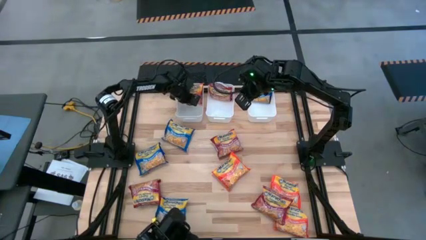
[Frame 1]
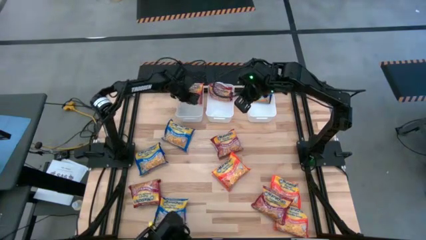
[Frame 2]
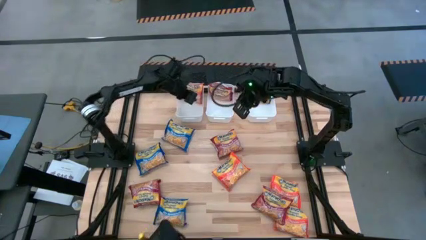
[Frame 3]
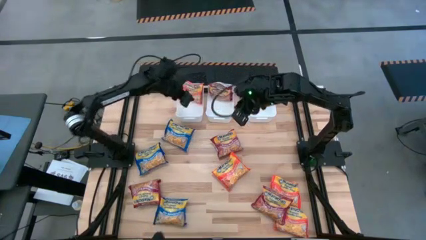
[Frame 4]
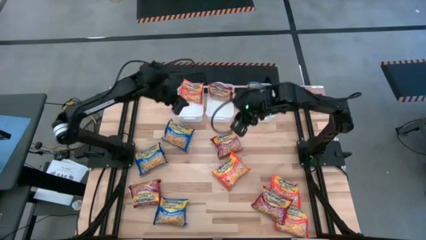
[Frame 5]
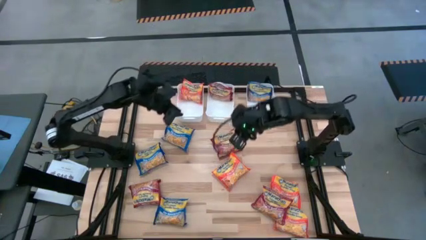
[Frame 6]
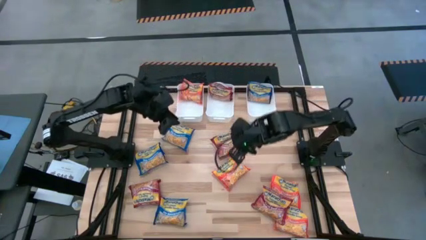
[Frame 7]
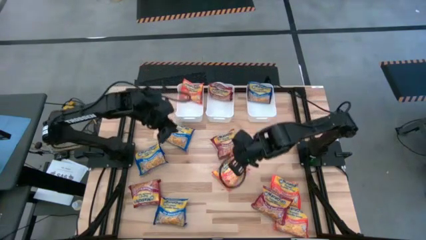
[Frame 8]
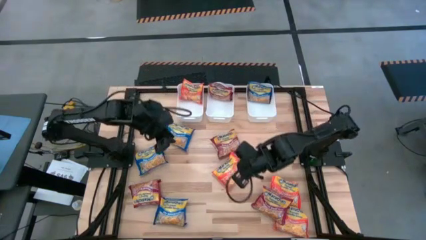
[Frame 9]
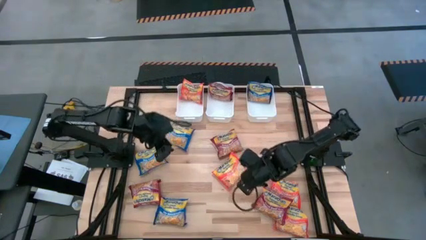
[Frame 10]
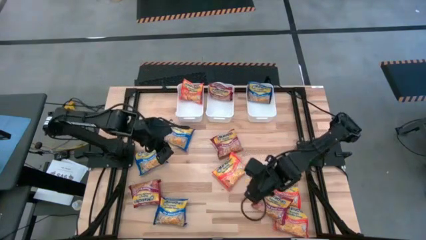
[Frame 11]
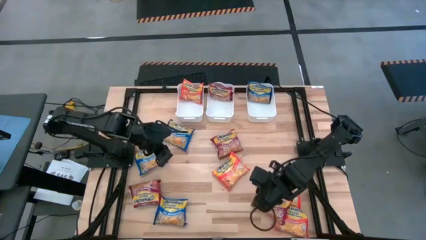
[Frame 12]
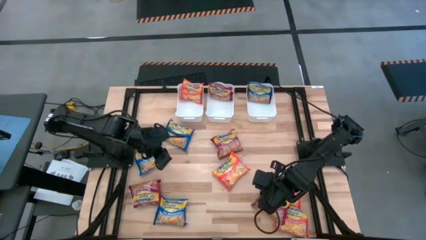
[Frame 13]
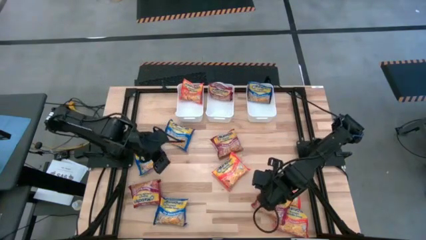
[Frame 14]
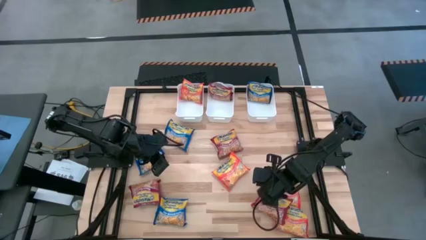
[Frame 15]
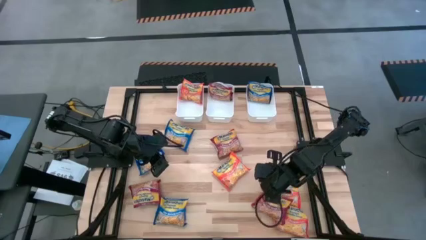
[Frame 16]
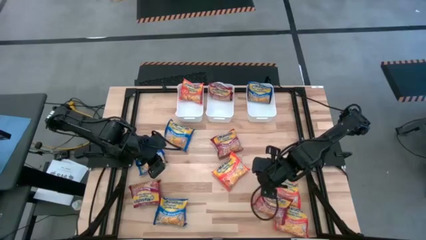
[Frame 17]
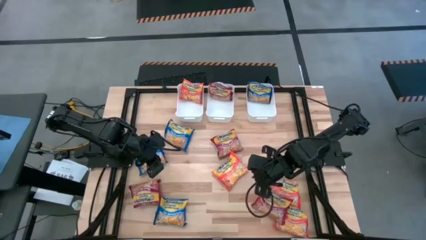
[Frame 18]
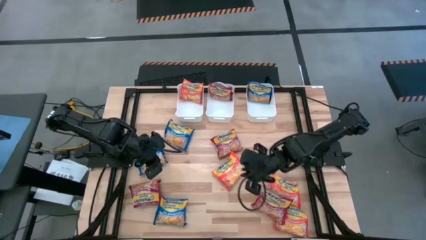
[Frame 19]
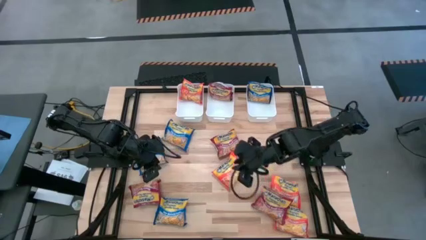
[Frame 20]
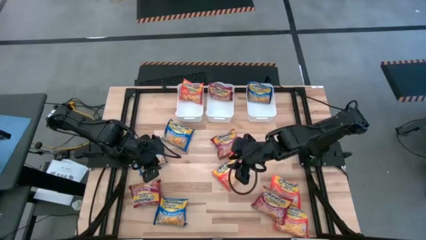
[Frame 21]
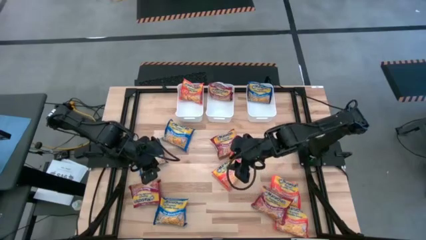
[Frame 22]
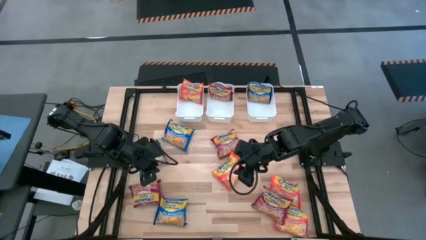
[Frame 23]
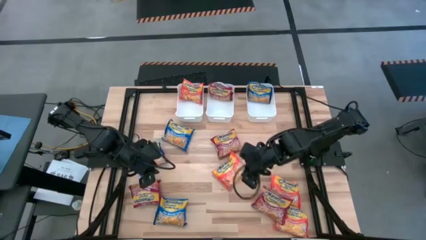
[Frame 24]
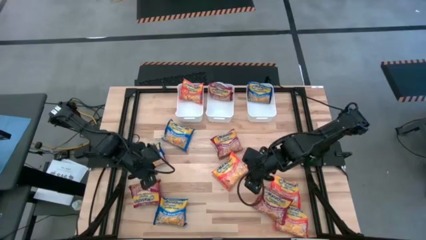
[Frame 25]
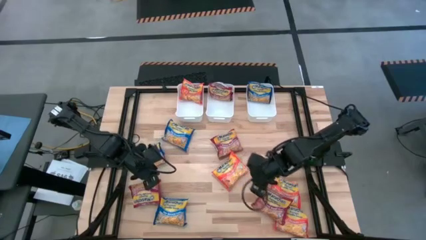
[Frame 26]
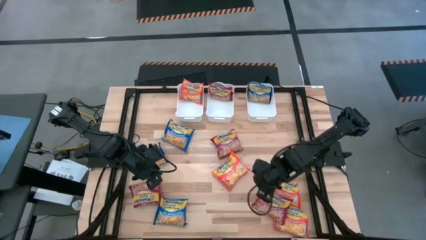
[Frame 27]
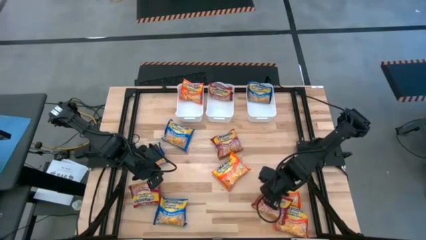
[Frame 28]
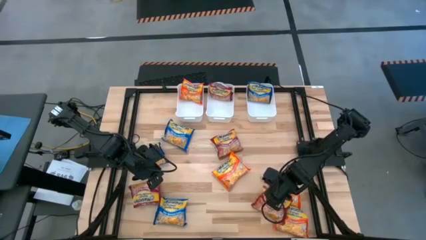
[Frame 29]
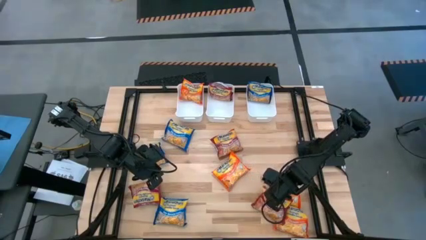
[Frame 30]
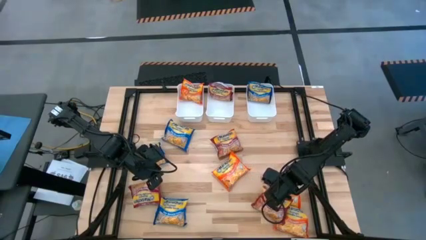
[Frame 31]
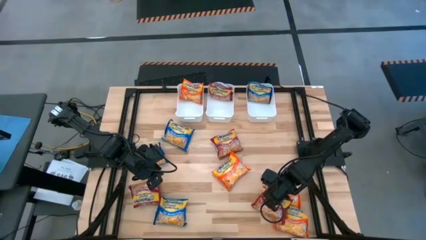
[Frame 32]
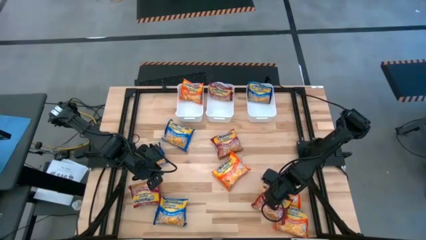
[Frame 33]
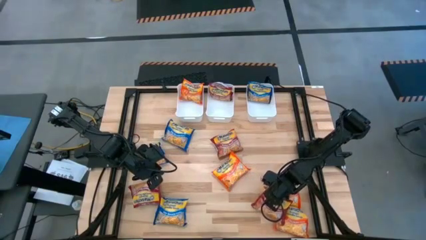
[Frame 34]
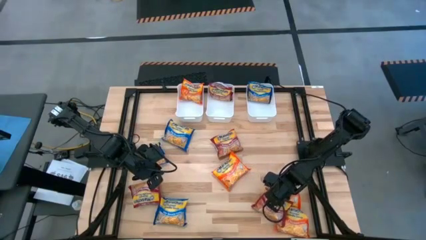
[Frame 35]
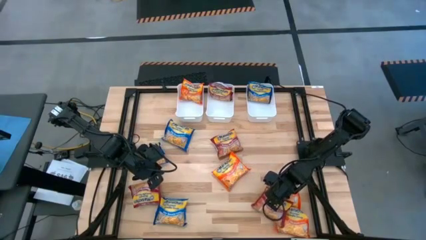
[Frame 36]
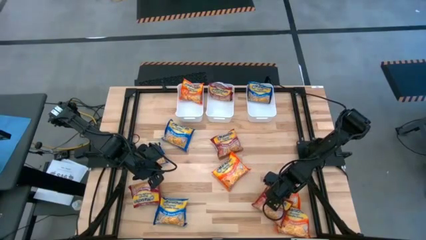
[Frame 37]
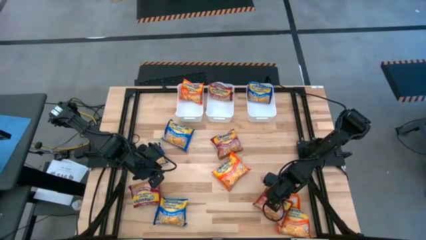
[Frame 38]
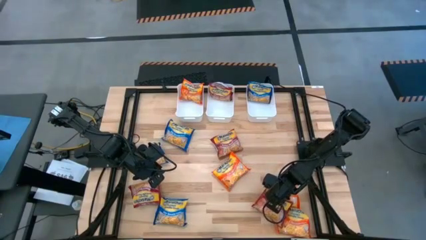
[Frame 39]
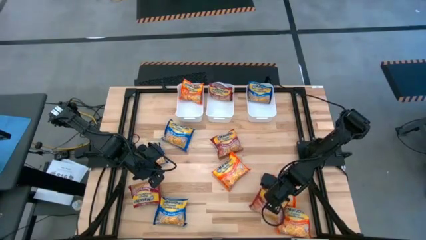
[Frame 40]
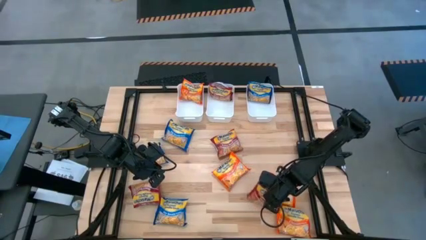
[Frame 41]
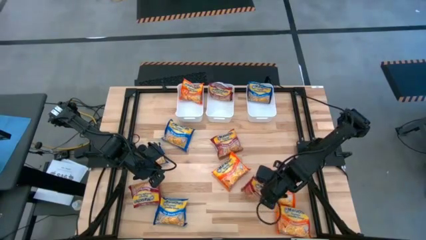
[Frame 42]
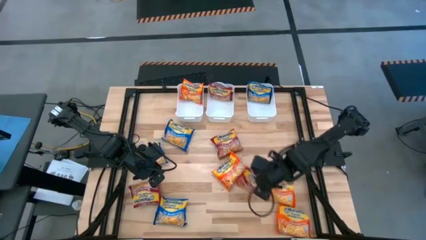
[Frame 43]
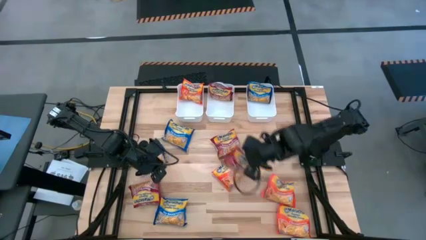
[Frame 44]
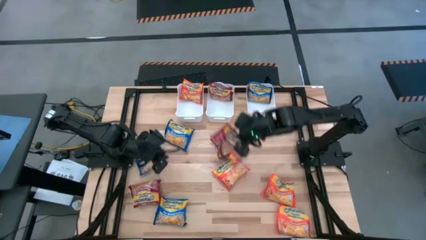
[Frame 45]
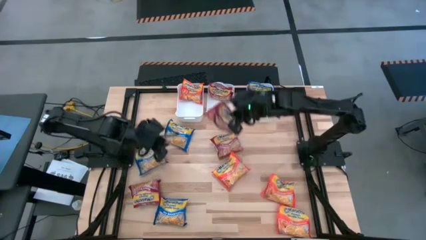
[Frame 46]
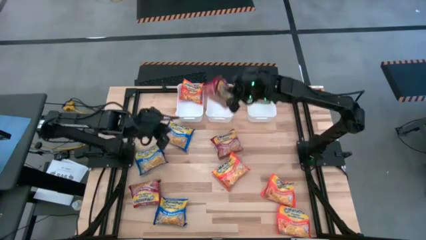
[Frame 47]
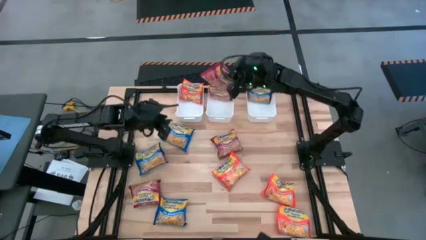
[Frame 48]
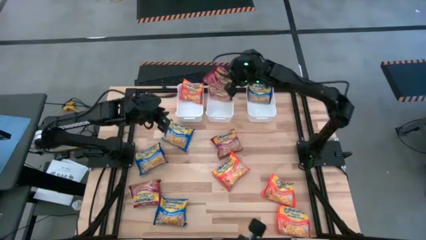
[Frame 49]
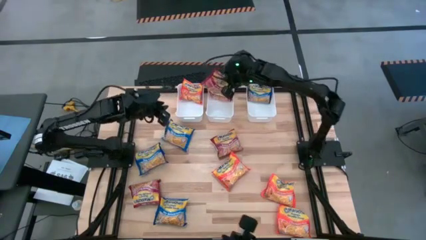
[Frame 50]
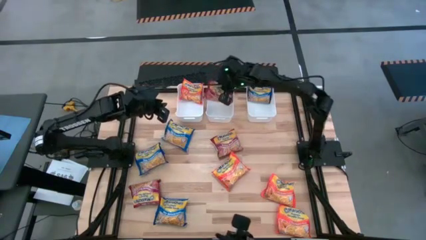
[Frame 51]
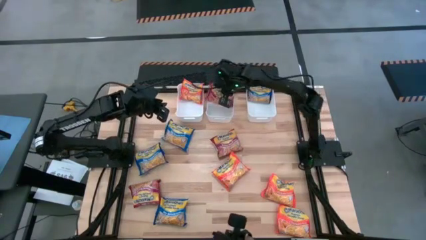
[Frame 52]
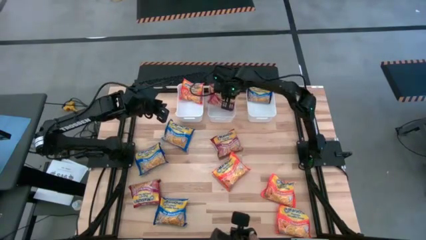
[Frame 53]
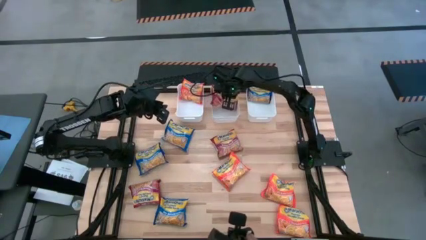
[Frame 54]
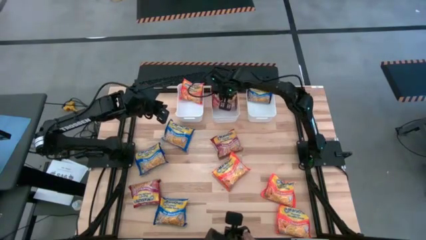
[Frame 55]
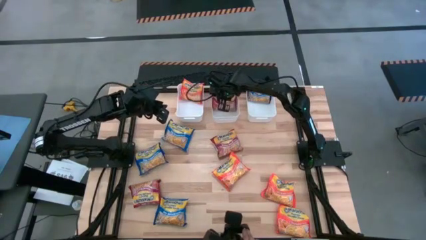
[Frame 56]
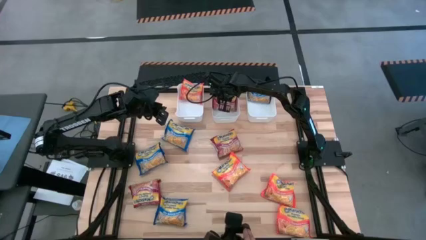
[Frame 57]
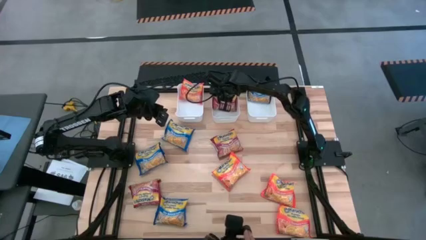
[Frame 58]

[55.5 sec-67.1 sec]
Task: Sort Maruchan noodles
Put the red noodle pack into the middle white bin

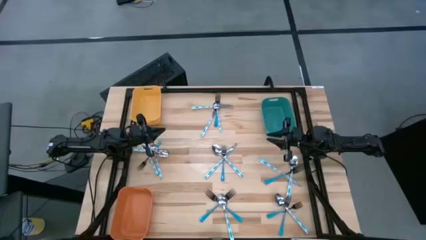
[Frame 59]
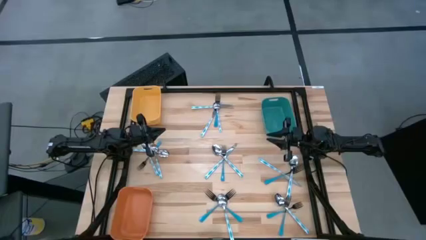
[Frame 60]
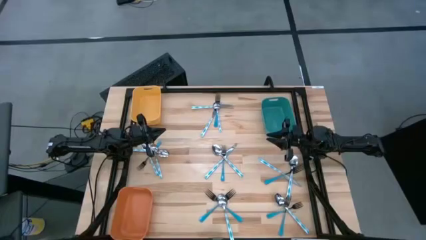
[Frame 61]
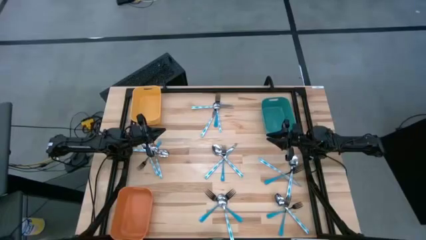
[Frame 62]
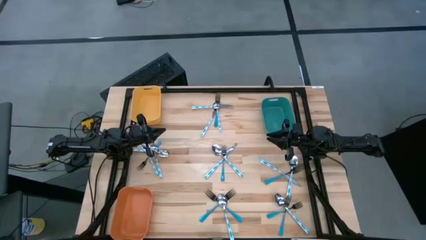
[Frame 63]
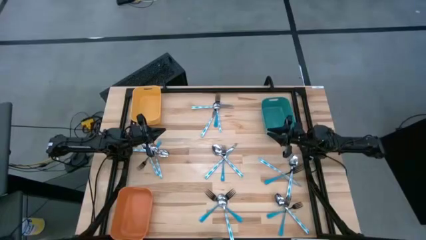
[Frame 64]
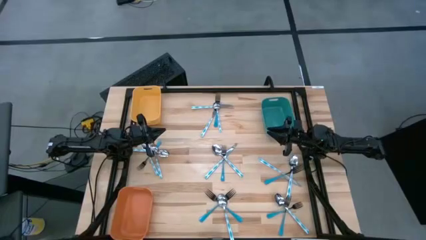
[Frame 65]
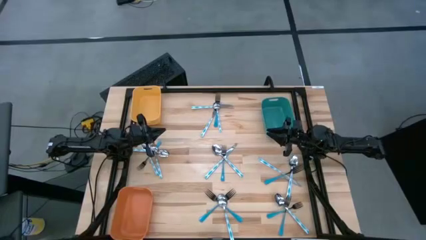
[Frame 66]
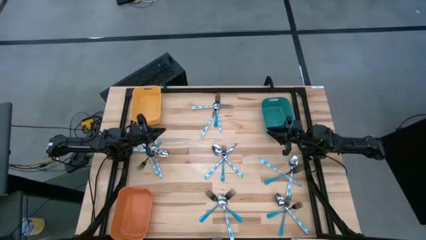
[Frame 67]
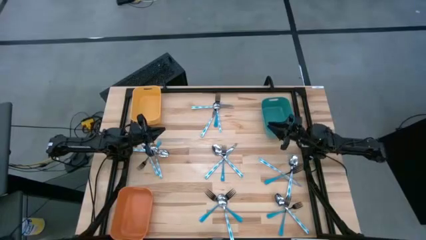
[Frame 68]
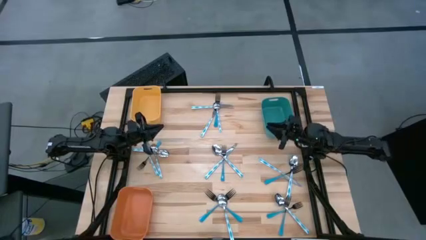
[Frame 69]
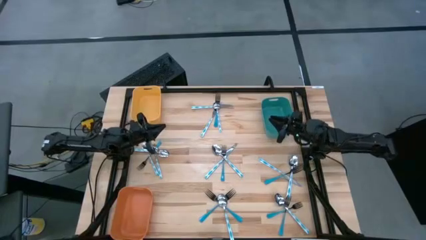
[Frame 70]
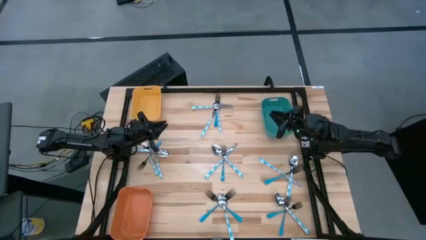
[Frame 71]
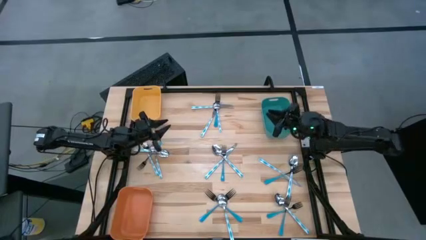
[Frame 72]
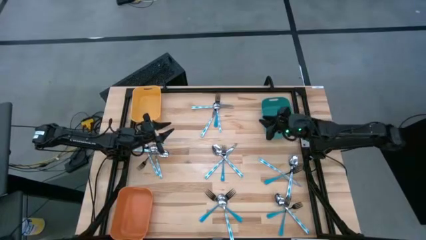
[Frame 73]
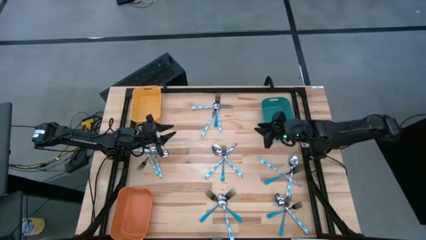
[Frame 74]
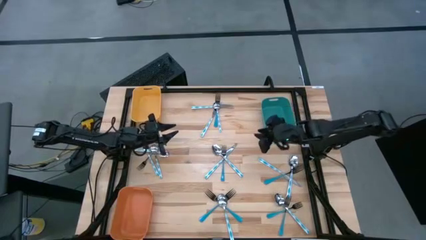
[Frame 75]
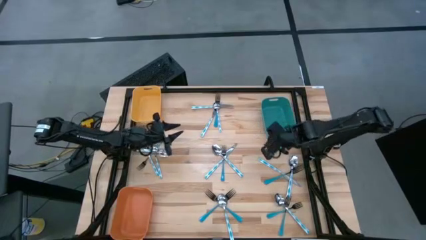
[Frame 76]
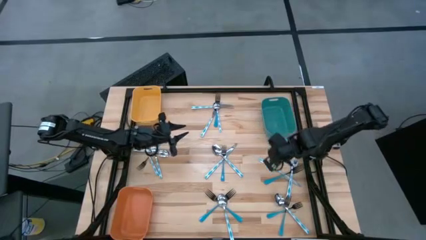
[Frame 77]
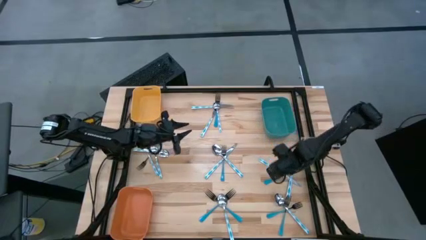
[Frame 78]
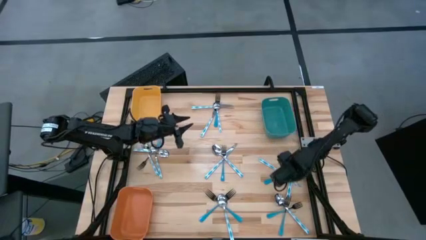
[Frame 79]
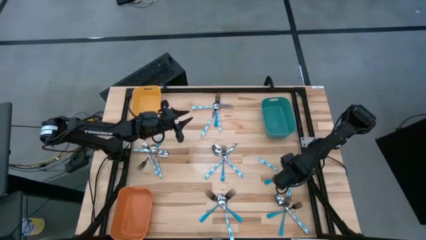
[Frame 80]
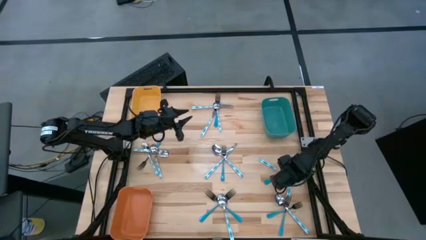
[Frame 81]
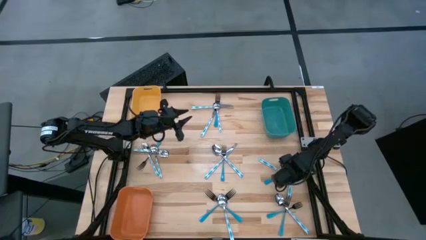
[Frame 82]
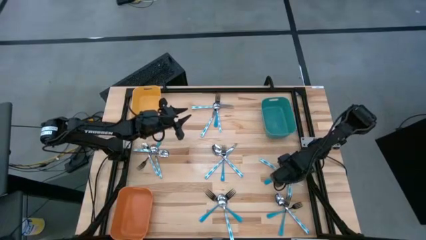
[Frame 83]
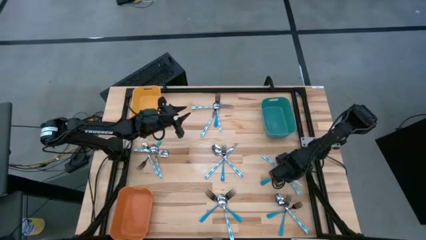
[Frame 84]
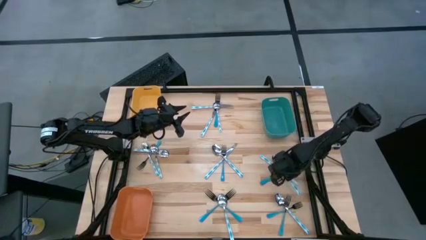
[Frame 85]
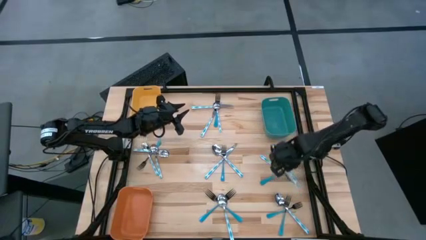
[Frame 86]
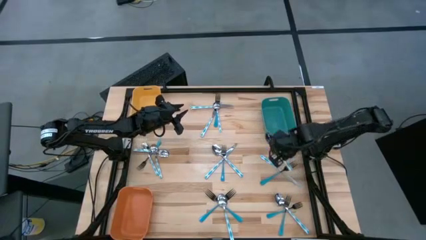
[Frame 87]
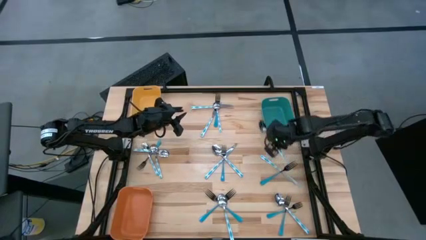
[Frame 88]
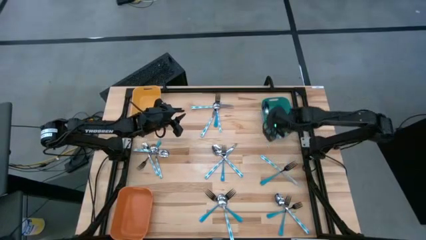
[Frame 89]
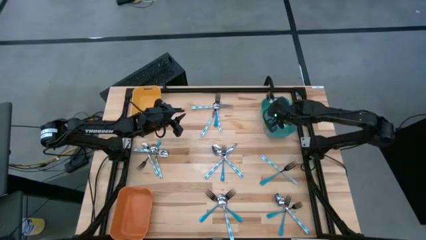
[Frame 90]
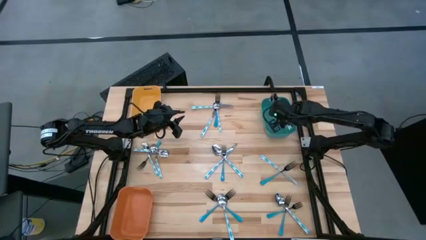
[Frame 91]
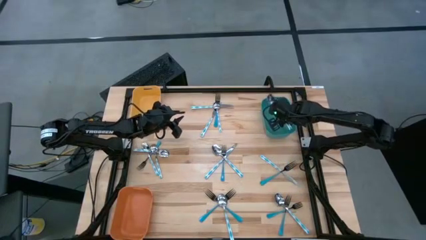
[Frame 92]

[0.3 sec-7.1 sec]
Task: Sort silverware by color (type)
Put the white-blue spoon into the blue bin
